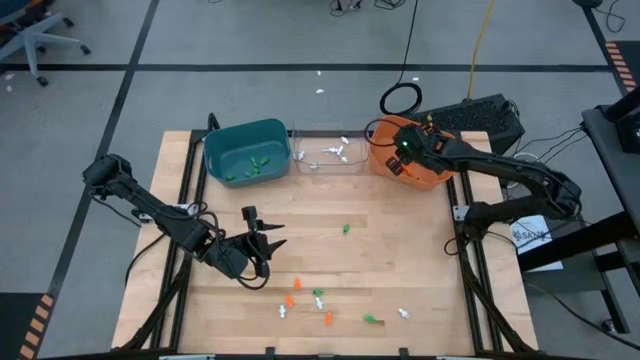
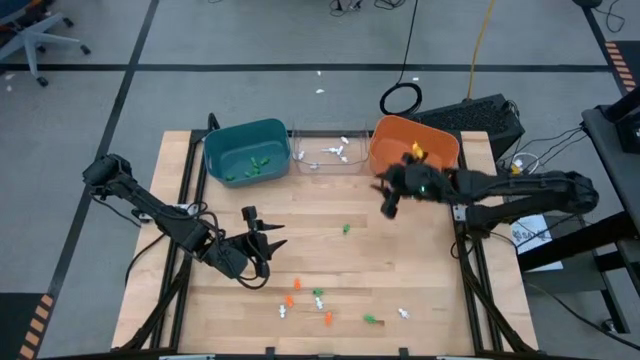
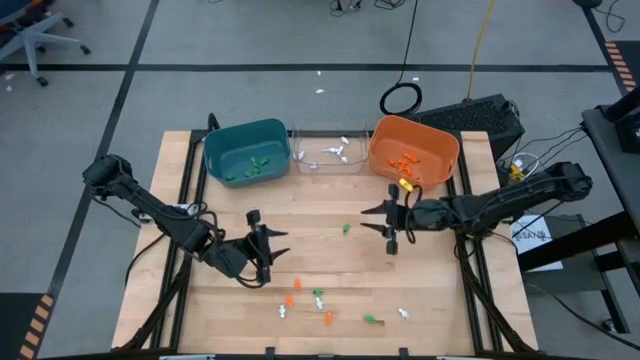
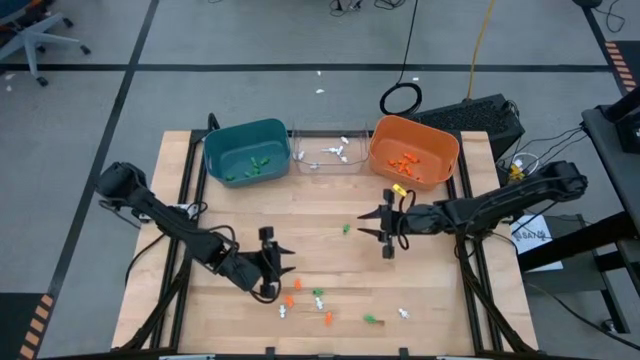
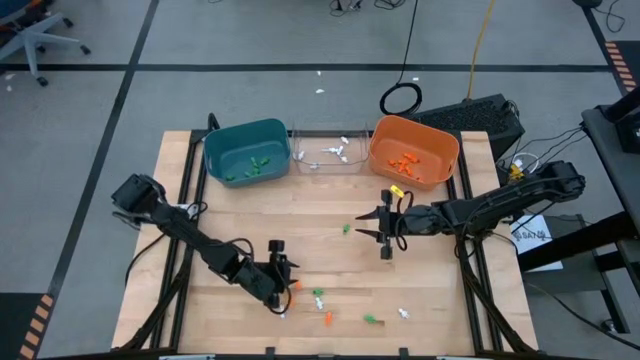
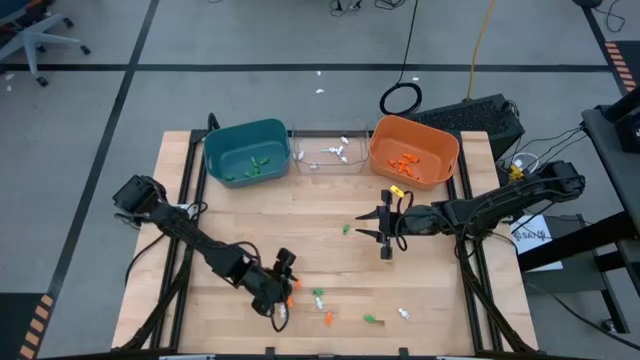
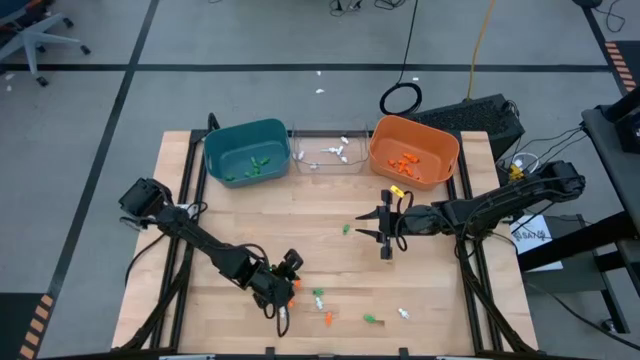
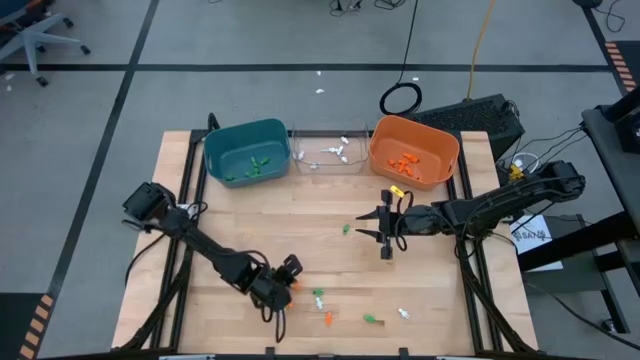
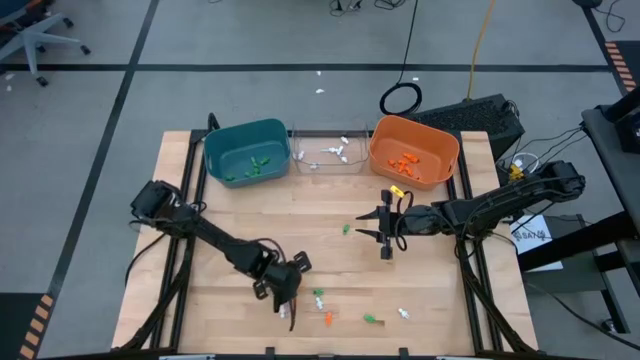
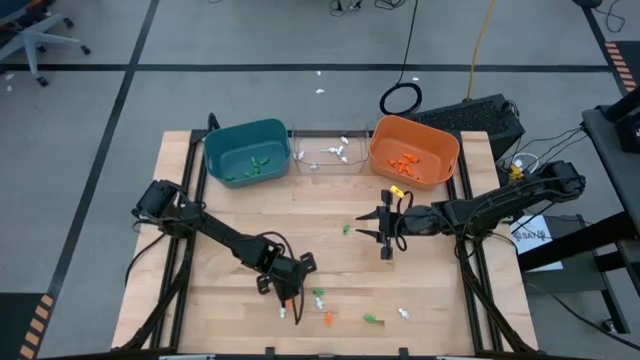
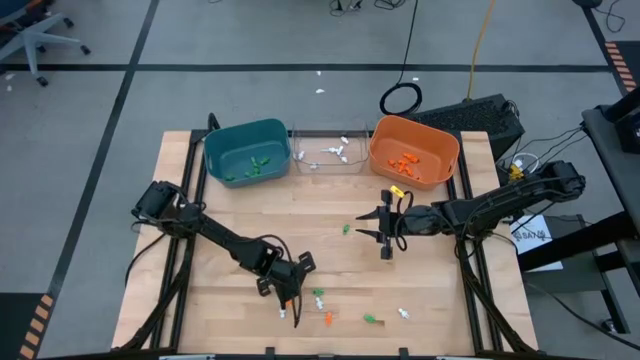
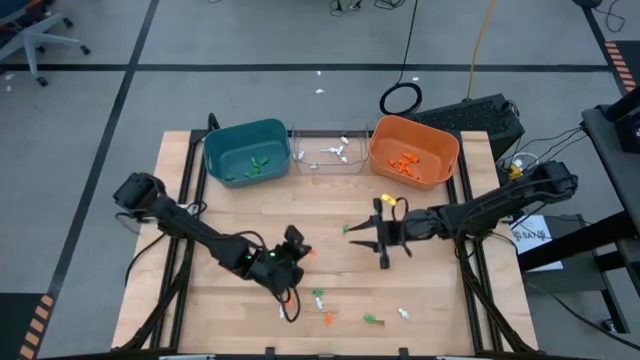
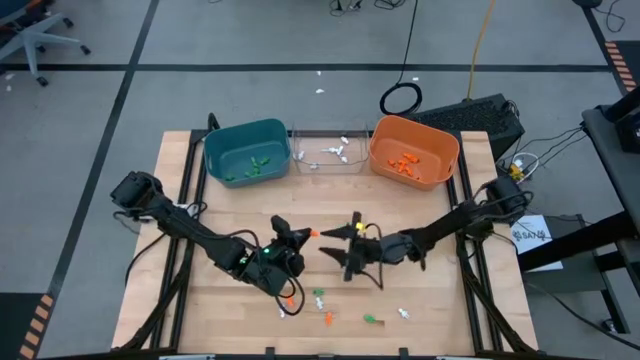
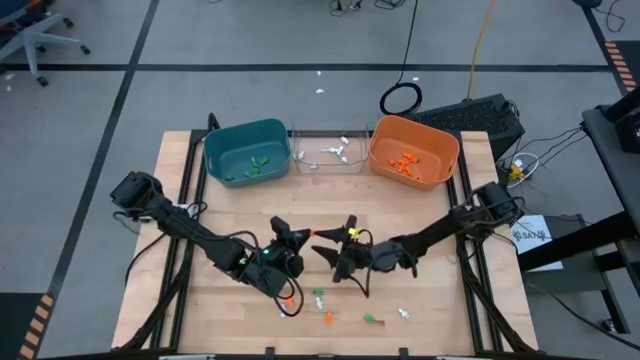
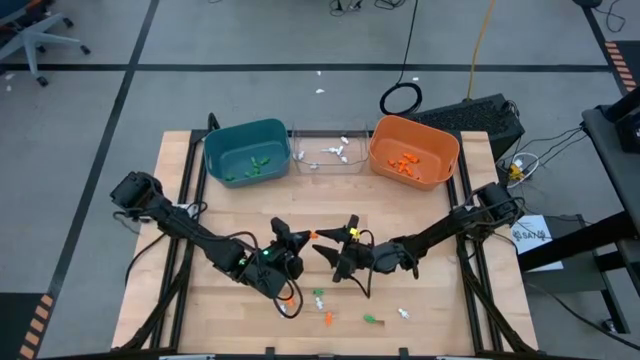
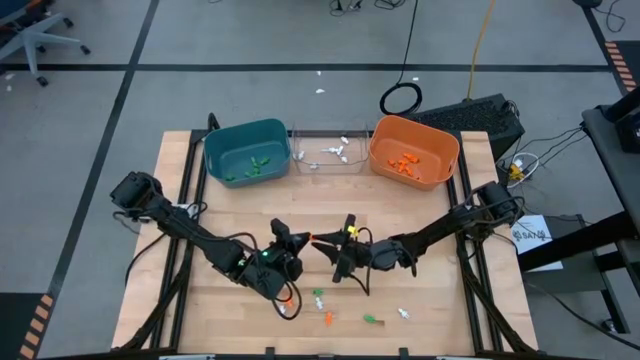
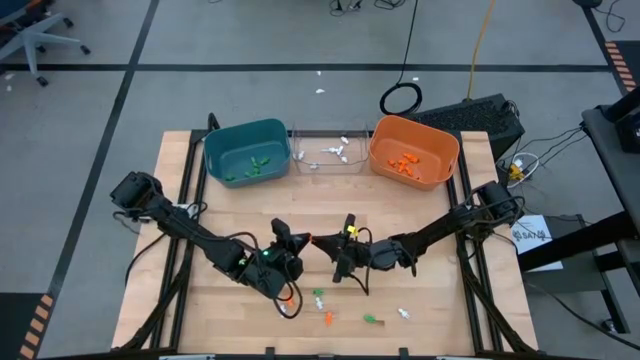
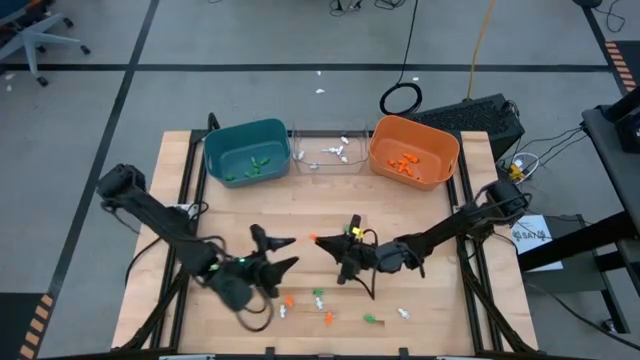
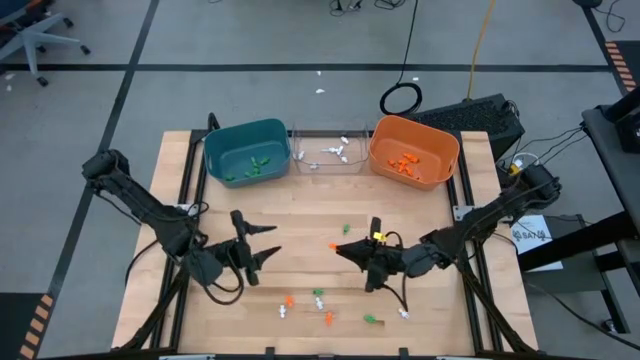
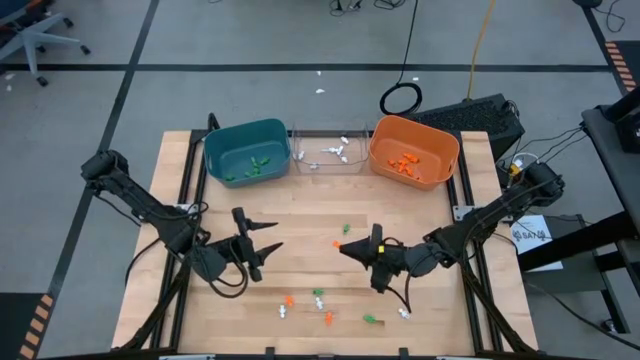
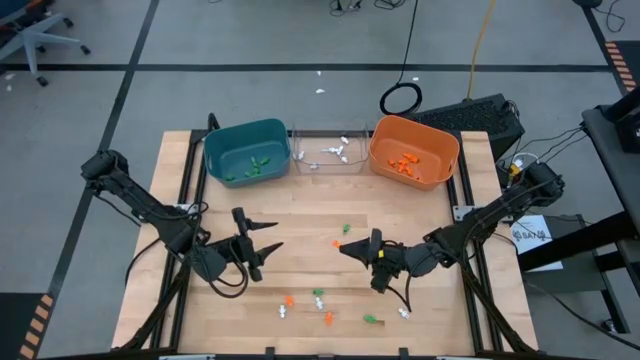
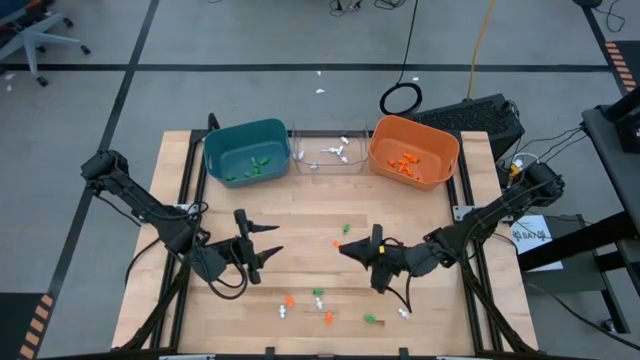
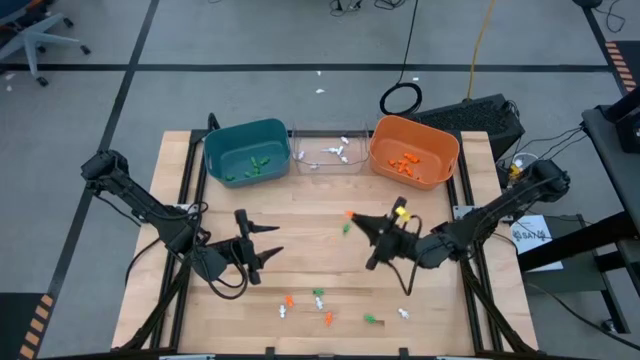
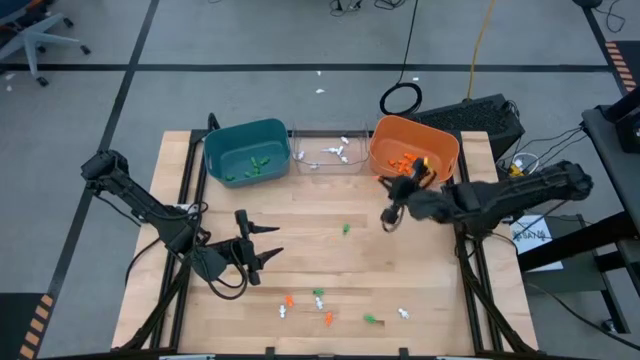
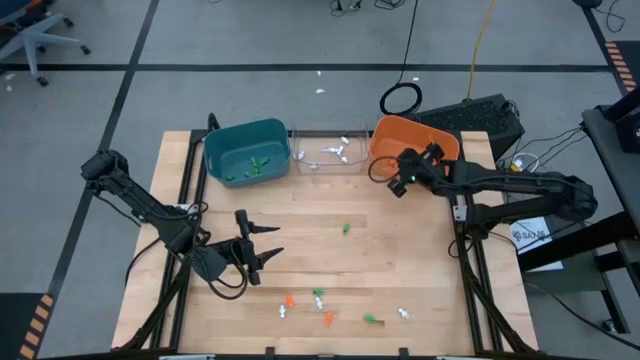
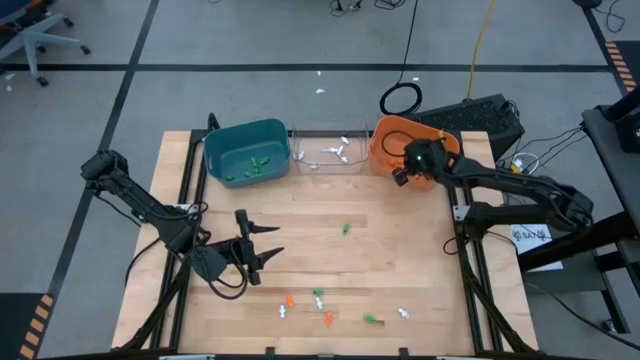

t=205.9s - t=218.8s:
Task: Sort Halloween decoration
Put the orange skeleton toy into the orange bin

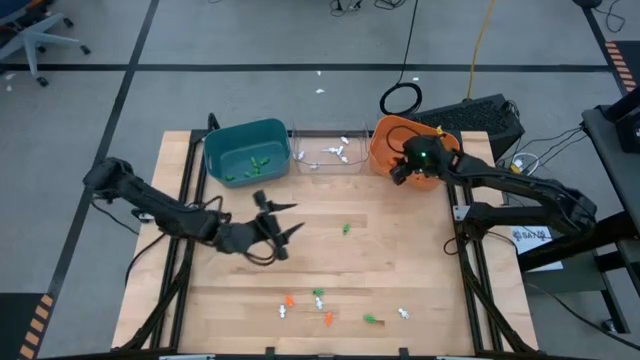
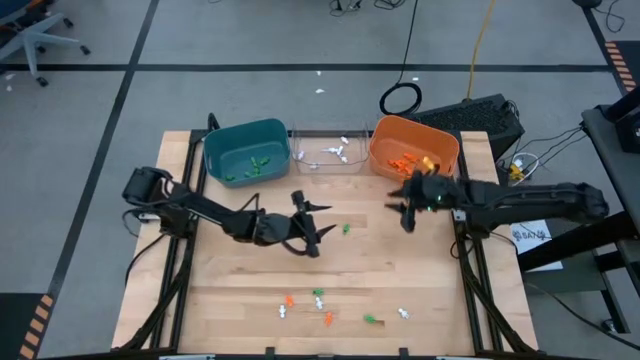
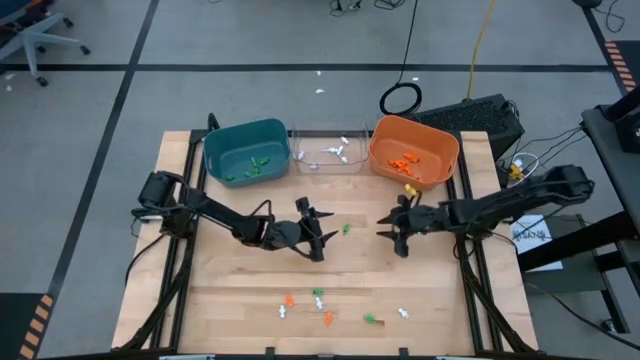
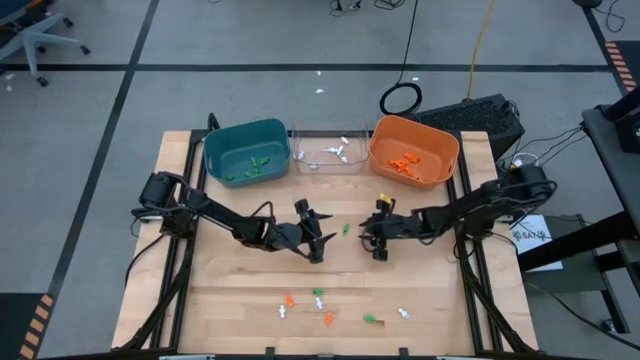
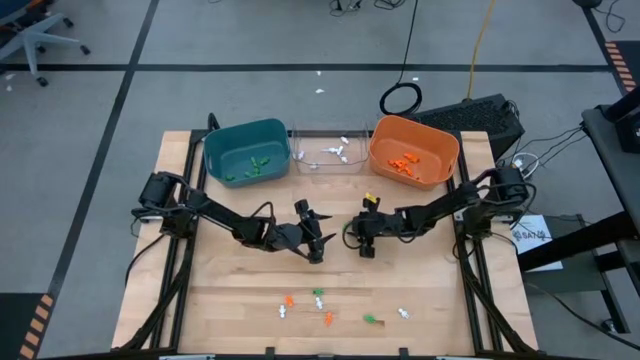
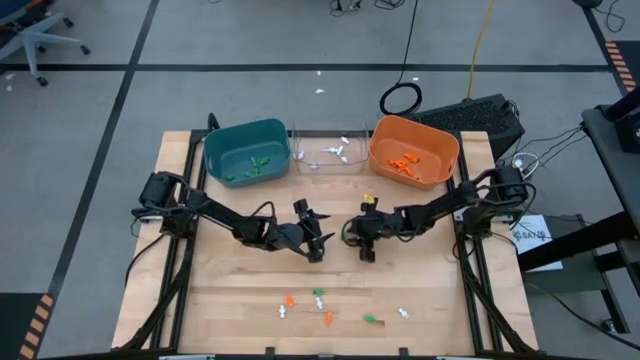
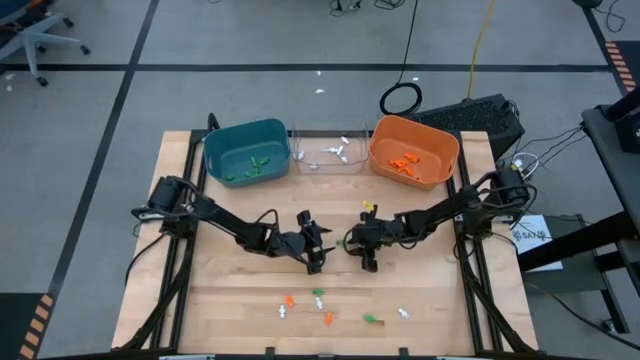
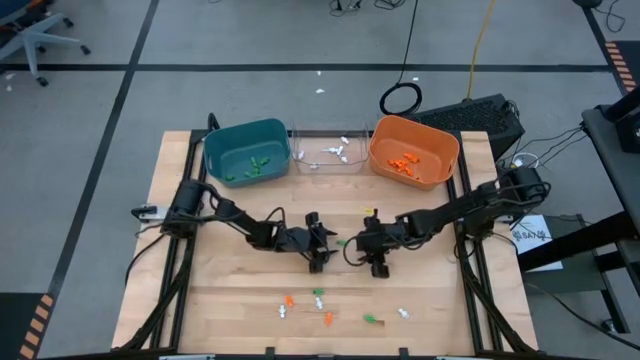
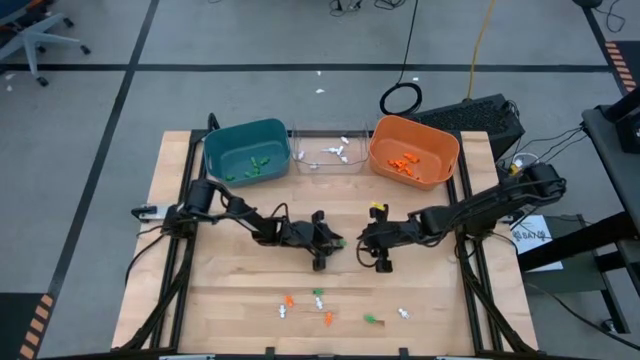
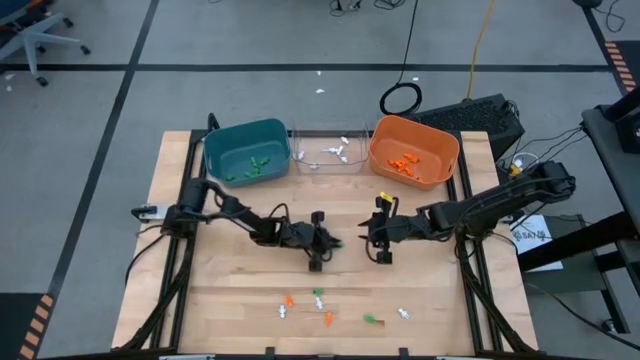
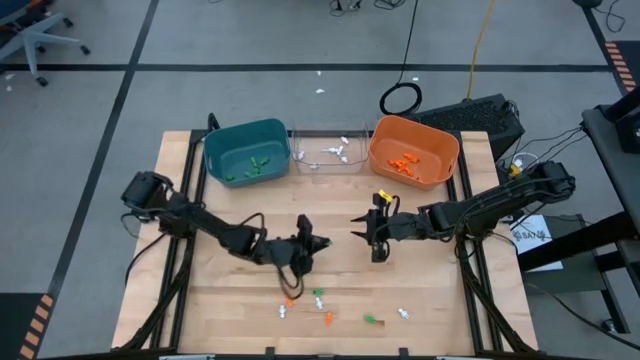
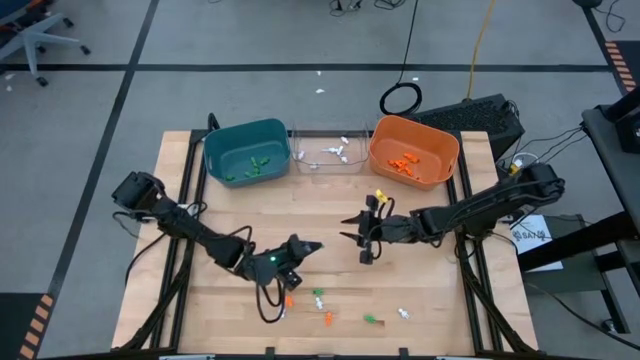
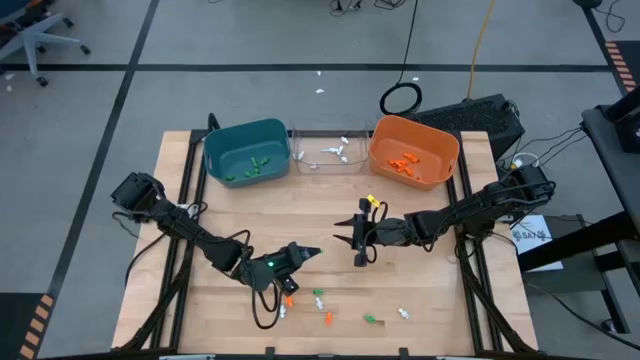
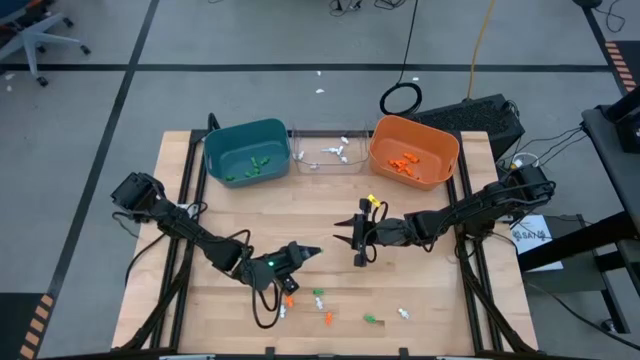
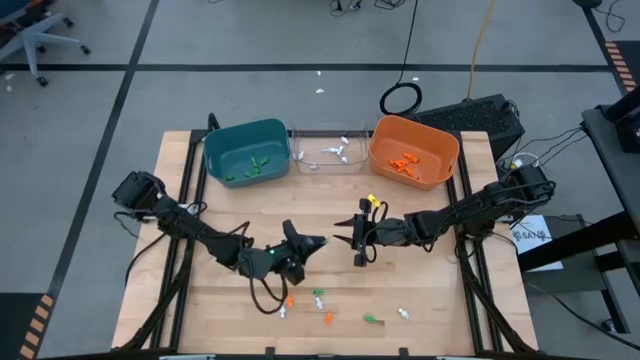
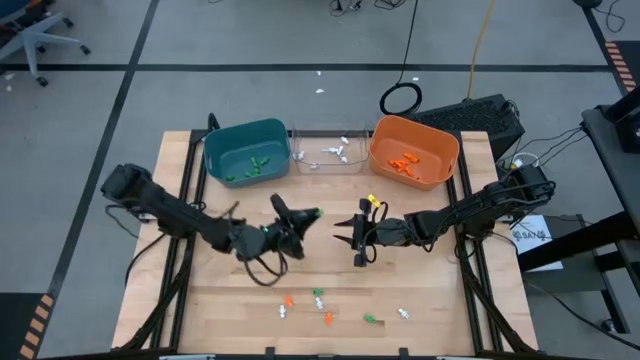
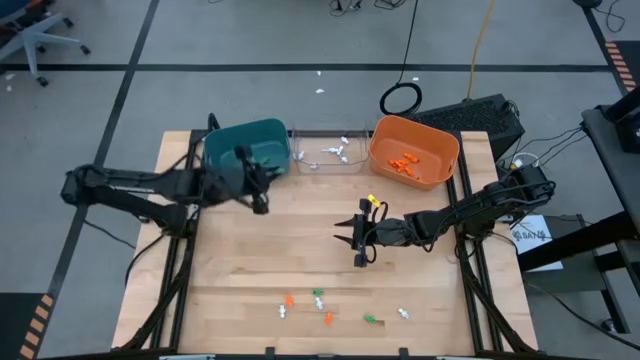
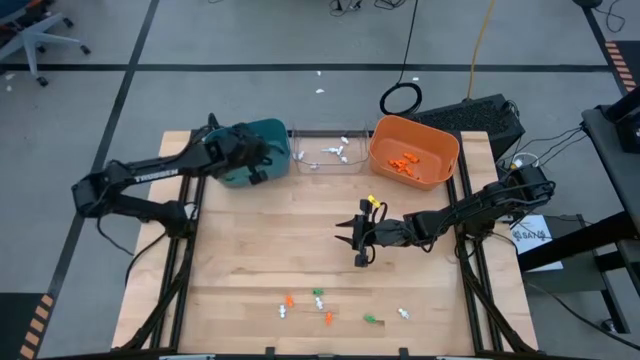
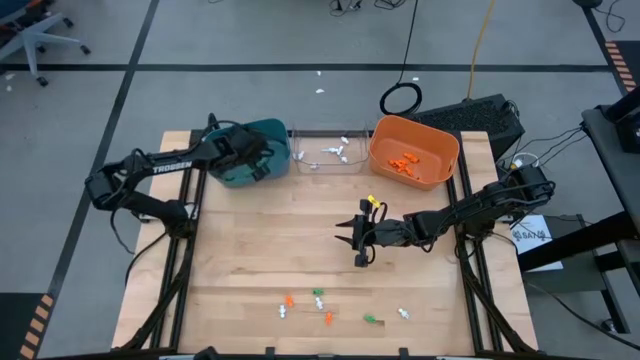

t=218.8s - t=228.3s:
Put the green skeleton toy into the blue bin
